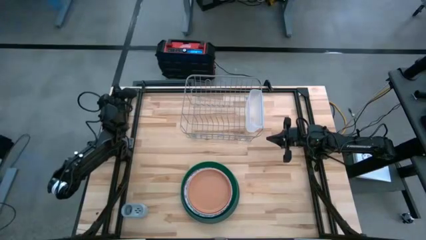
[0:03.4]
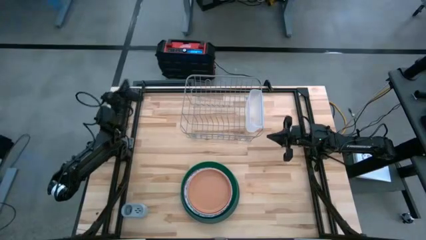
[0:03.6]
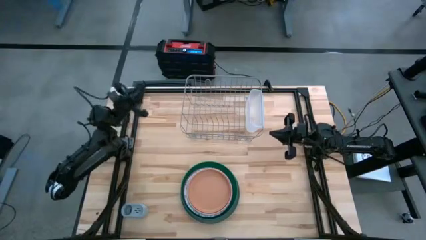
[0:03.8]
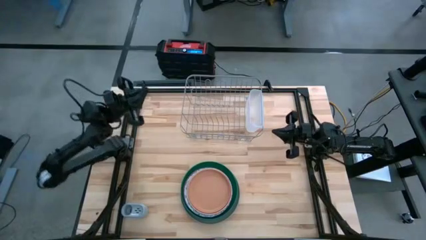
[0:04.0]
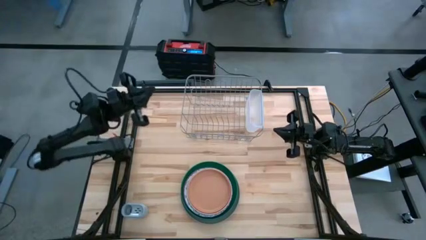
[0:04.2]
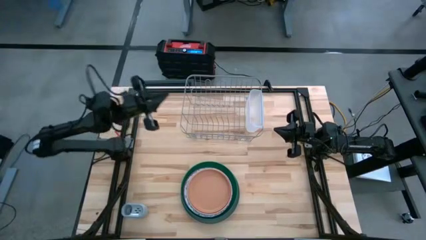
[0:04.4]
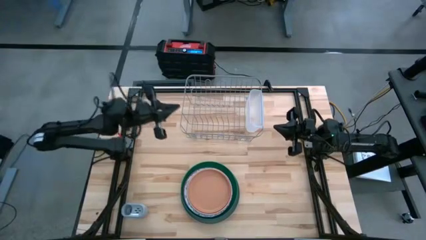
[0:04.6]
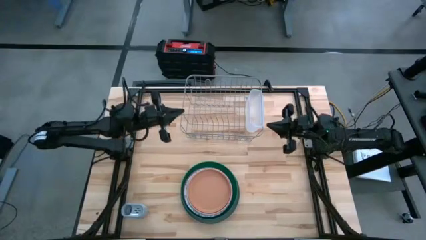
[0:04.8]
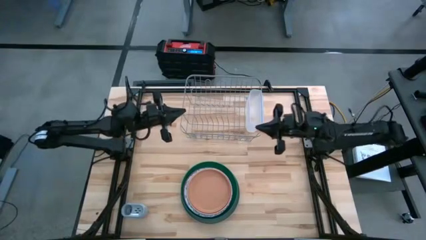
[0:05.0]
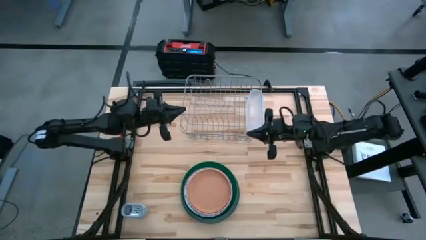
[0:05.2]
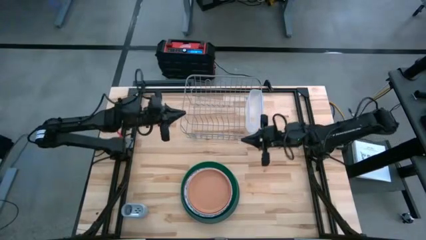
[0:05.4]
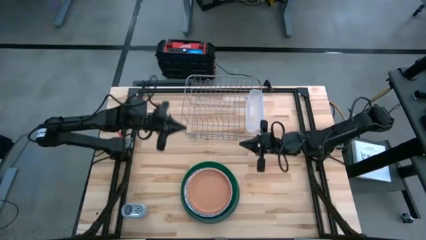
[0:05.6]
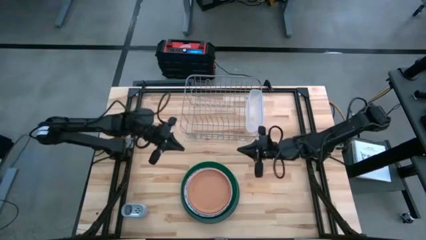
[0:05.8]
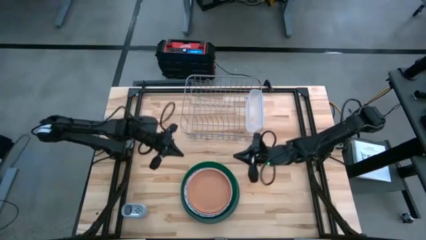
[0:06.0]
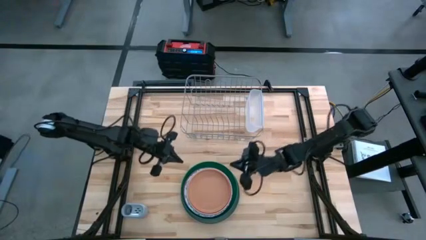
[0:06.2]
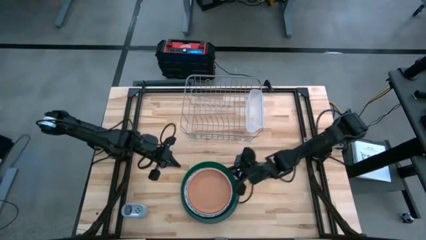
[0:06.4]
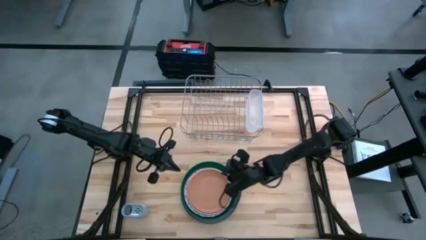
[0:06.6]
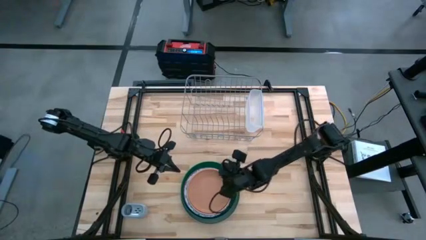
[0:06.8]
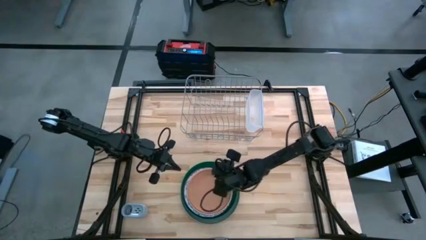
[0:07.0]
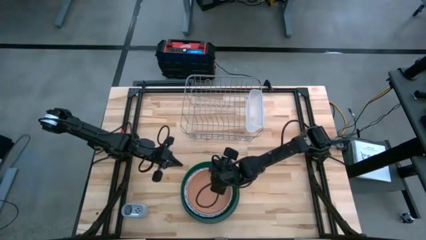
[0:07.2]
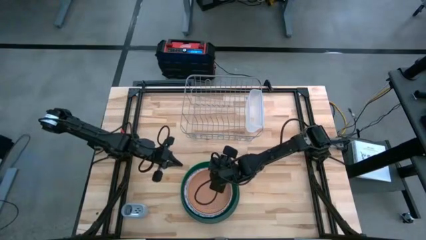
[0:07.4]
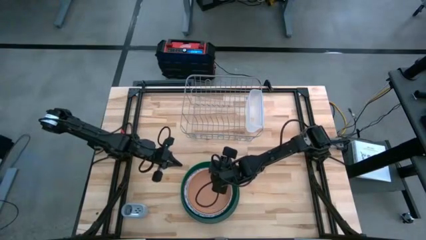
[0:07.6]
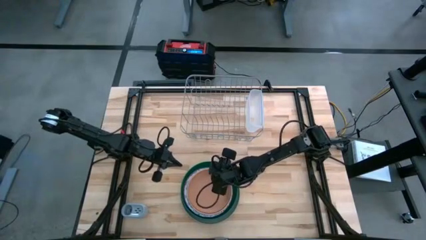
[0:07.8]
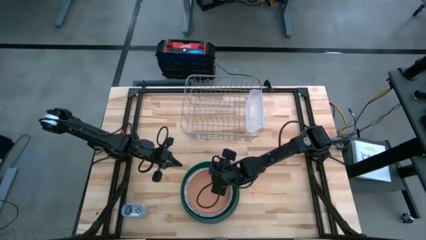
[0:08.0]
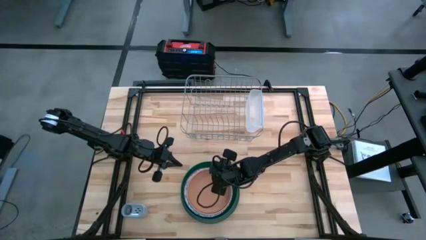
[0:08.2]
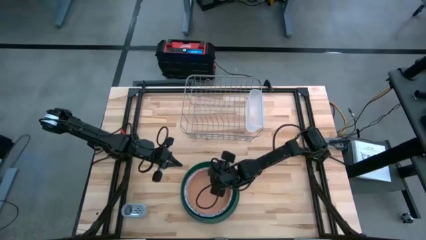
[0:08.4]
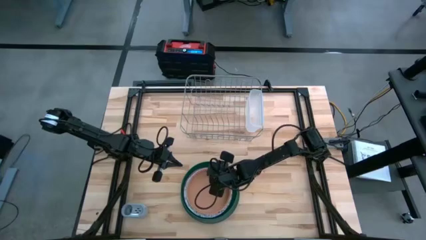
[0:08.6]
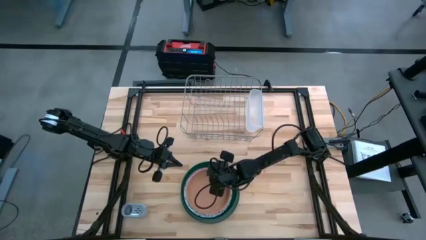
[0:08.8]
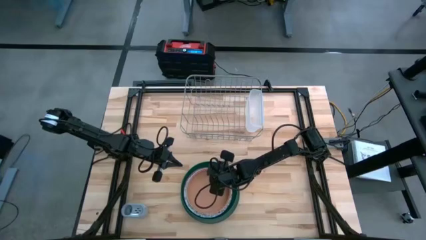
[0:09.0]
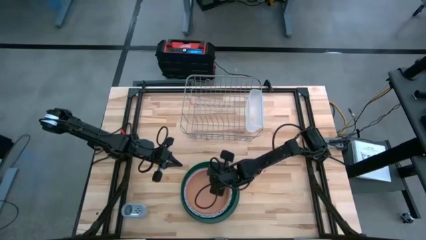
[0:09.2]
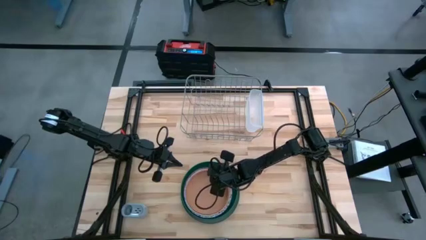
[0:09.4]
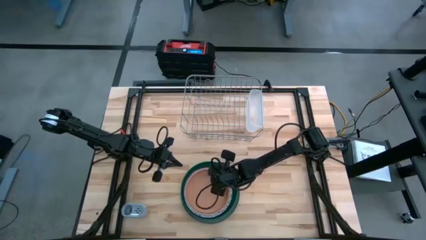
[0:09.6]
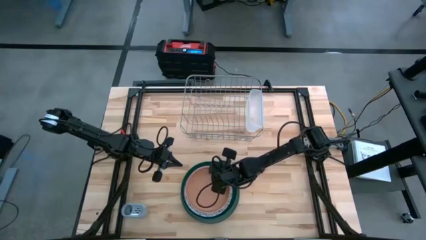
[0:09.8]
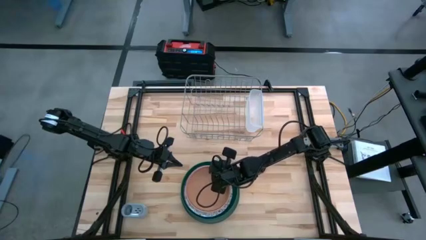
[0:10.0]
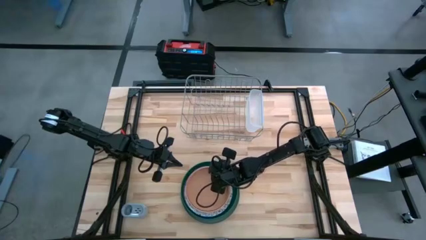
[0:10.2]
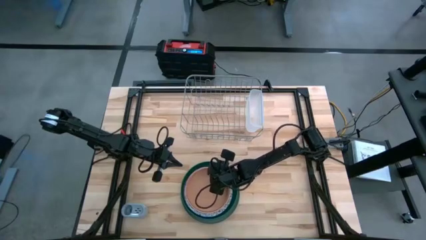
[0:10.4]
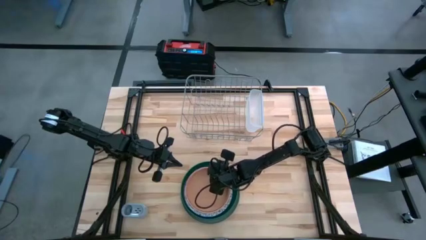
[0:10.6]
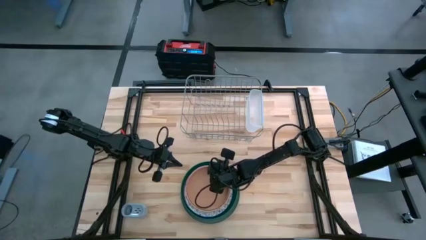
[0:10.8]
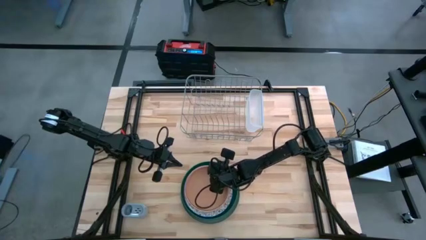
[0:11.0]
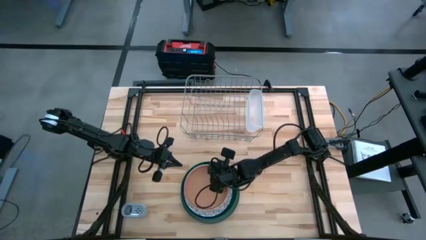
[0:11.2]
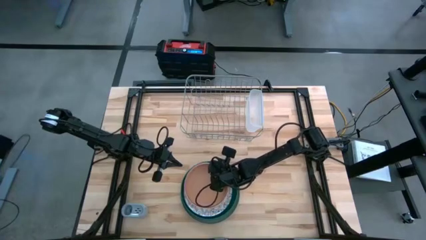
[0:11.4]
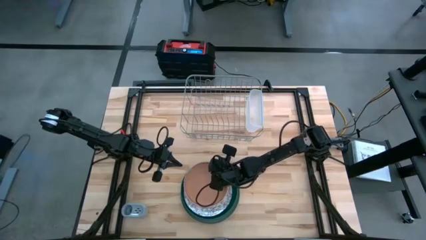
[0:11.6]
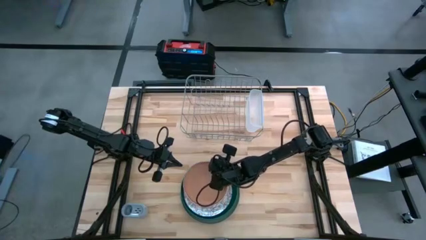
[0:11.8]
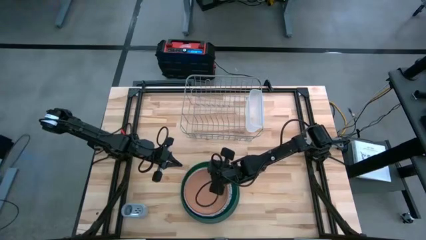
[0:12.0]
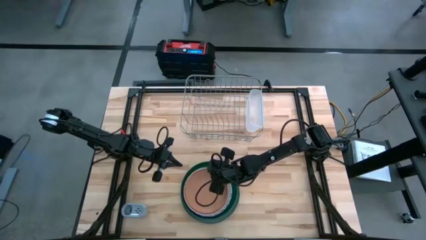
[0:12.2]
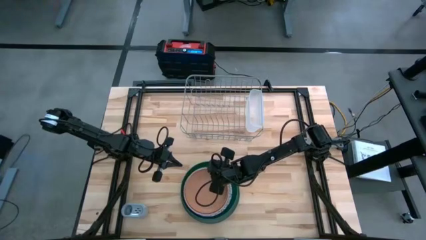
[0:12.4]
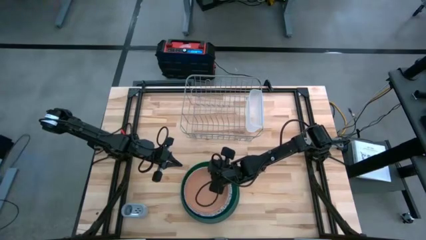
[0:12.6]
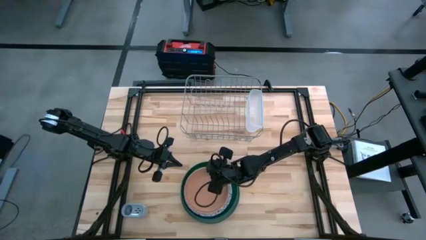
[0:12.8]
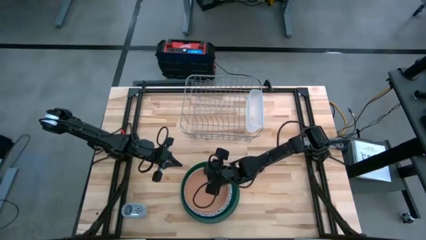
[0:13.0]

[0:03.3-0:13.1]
Task: Sort dishes
Put the light orange plate in the dish rack

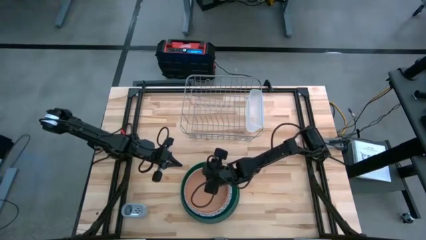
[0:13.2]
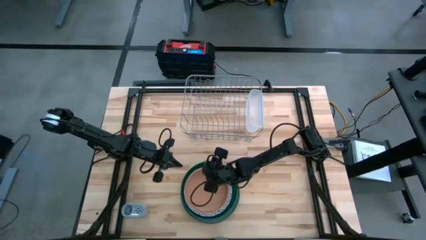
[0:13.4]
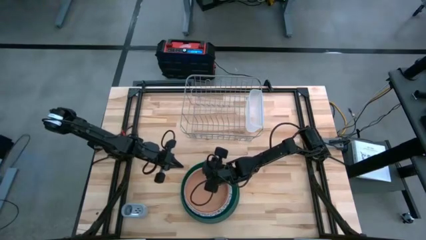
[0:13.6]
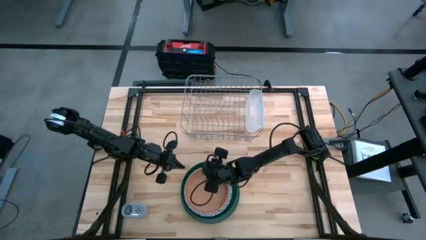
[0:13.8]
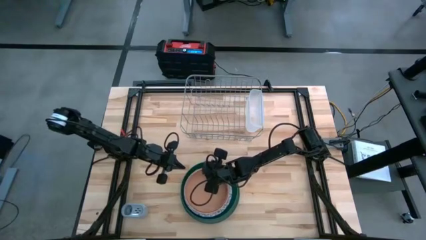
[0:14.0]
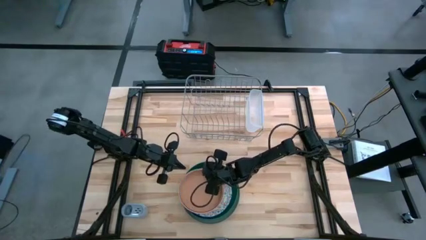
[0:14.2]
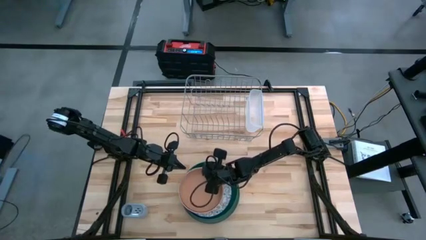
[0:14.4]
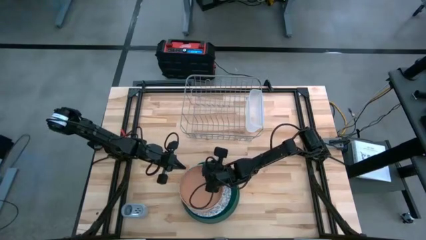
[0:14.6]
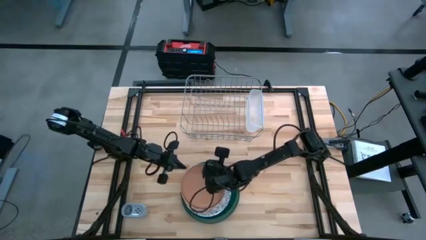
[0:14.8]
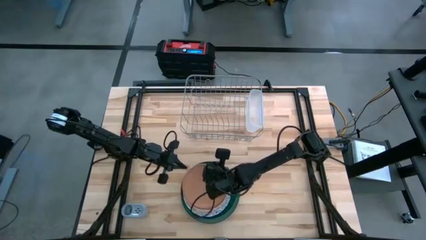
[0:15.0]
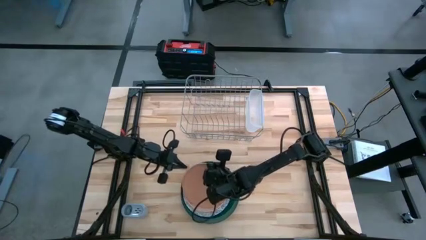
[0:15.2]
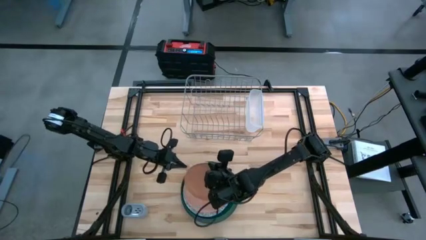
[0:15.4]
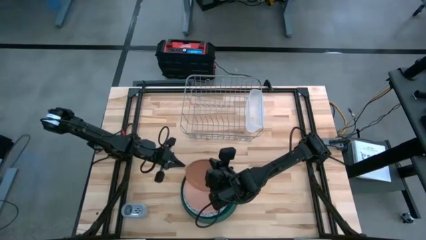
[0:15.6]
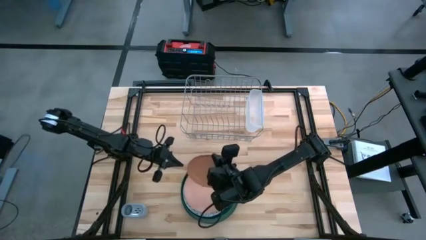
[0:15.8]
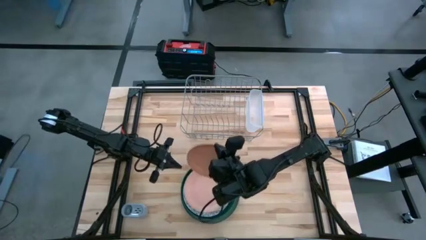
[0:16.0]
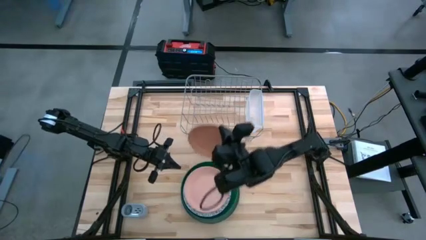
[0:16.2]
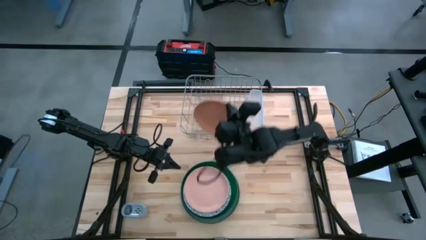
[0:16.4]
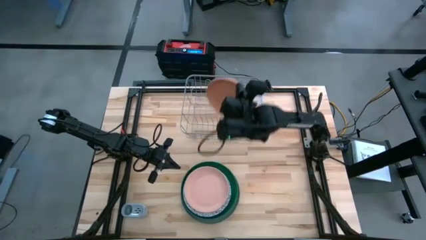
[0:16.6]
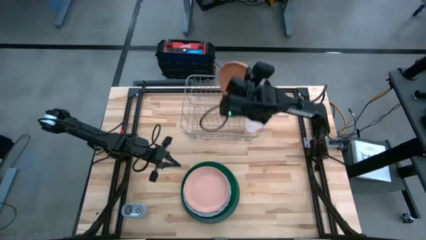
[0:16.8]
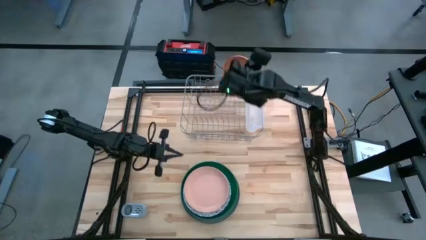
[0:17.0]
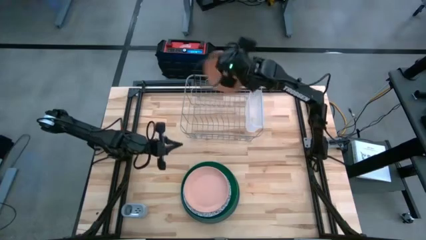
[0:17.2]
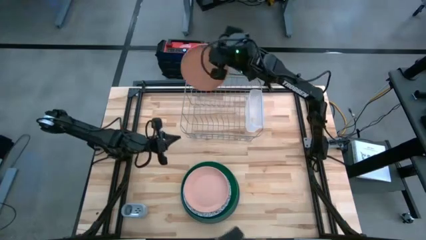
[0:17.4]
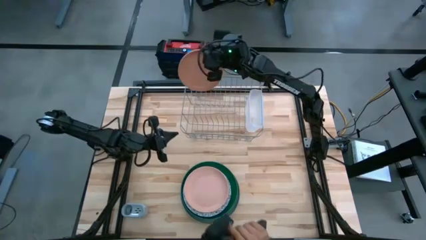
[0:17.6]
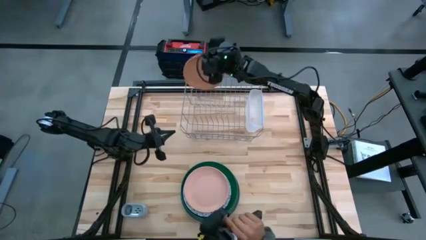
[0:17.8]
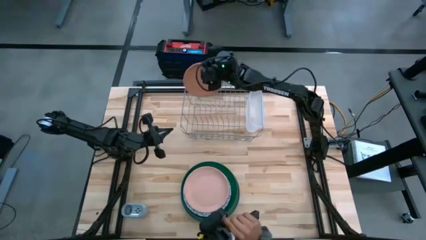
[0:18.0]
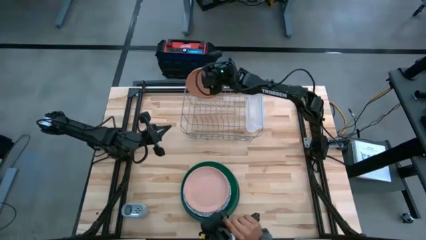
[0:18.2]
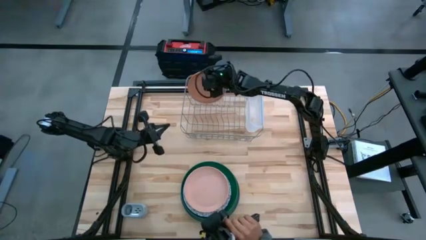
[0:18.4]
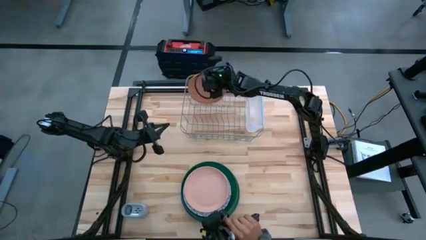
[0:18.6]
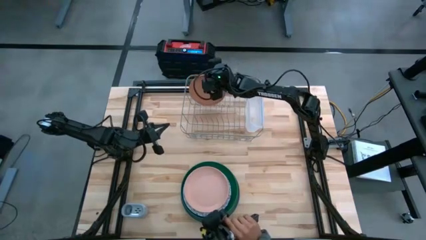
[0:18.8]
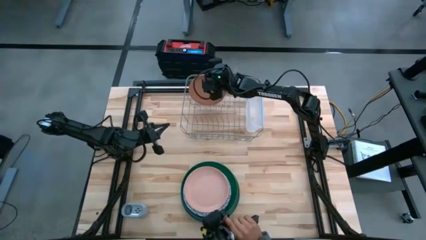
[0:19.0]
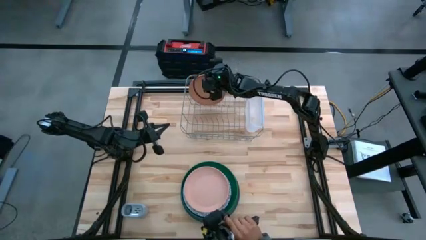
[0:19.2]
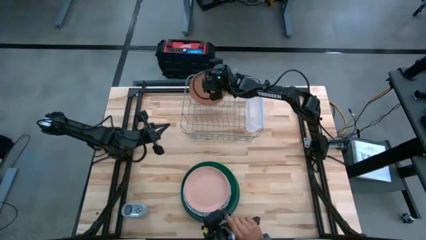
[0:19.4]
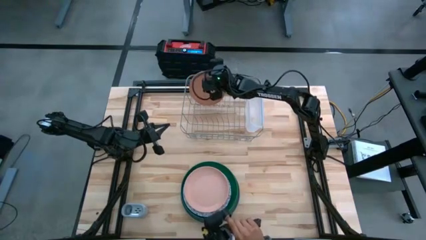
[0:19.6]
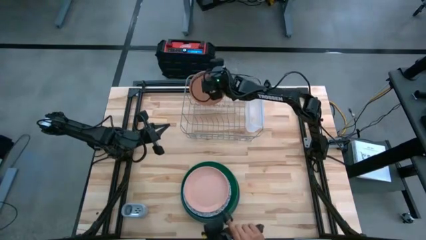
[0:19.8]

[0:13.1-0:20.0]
Put the light orange plate in the dish rack

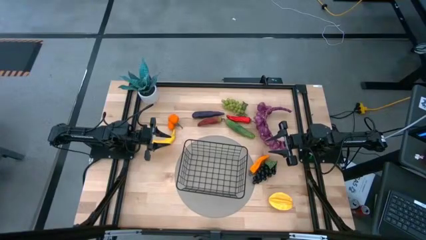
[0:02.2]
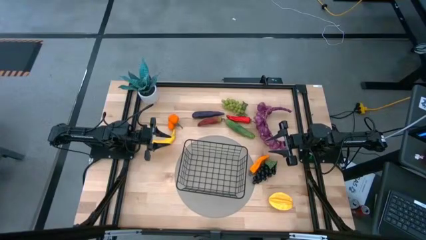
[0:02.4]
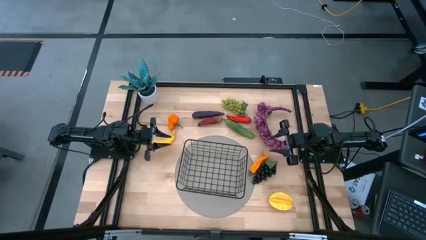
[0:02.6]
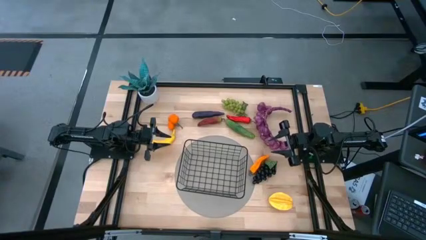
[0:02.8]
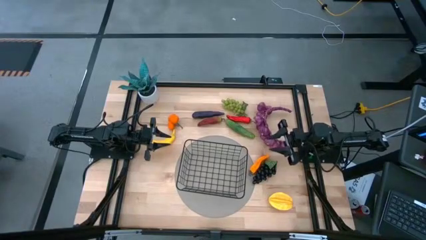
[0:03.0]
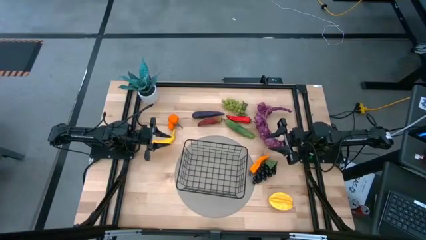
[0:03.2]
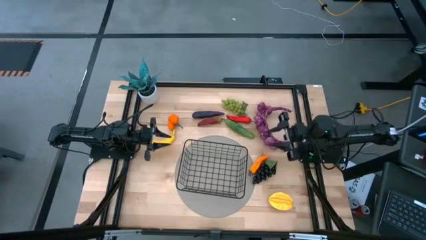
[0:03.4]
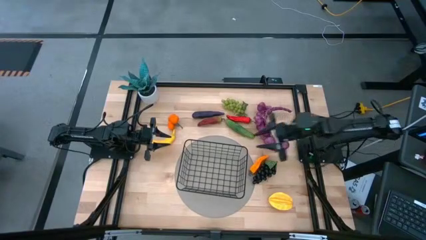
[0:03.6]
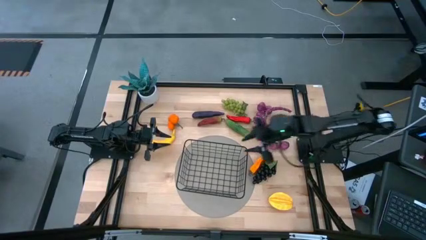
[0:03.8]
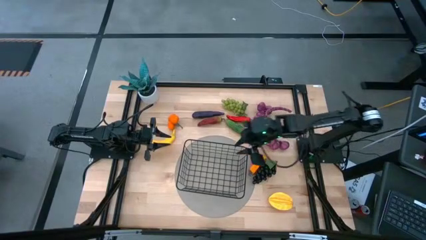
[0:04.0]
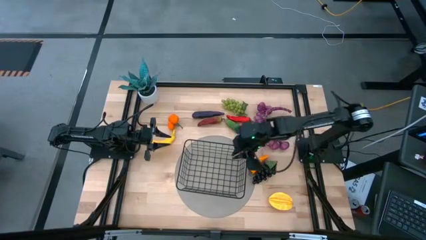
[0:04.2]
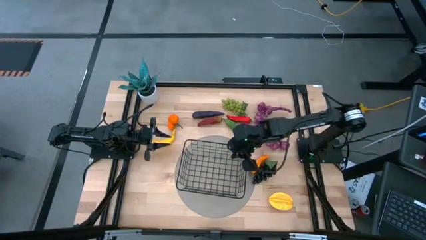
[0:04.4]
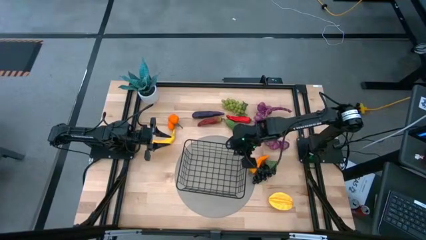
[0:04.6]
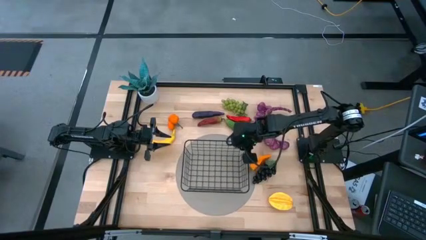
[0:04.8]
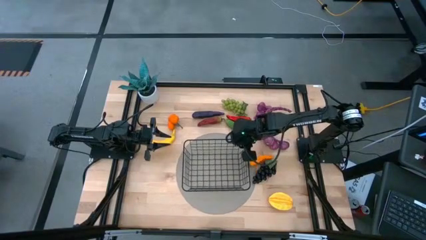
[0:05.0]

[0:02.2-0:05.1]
Task: Build produce basket
Prepare the black wire basket
